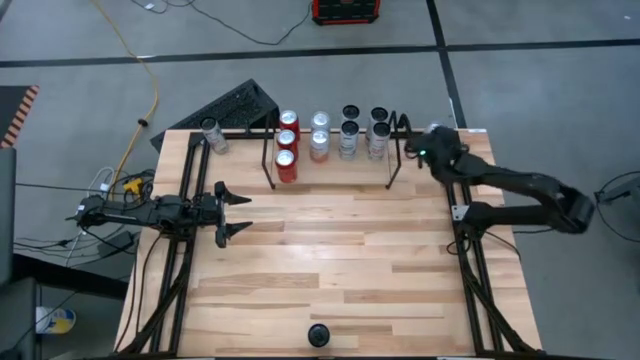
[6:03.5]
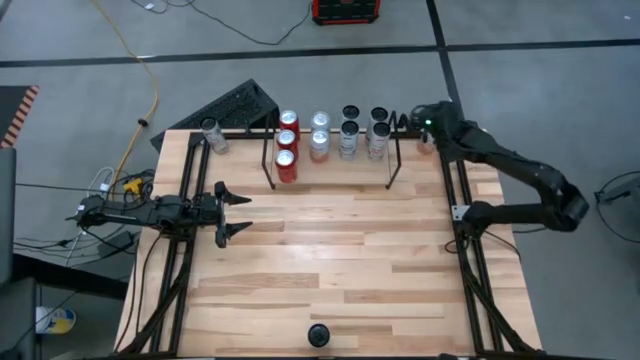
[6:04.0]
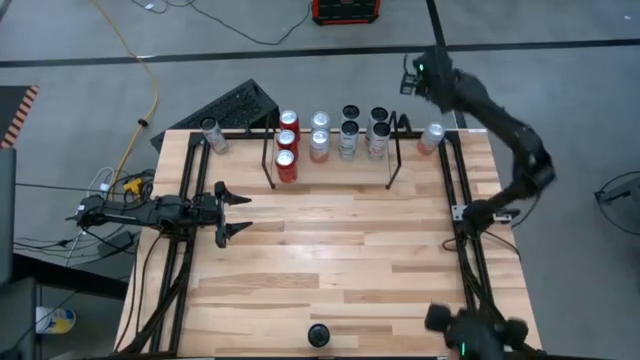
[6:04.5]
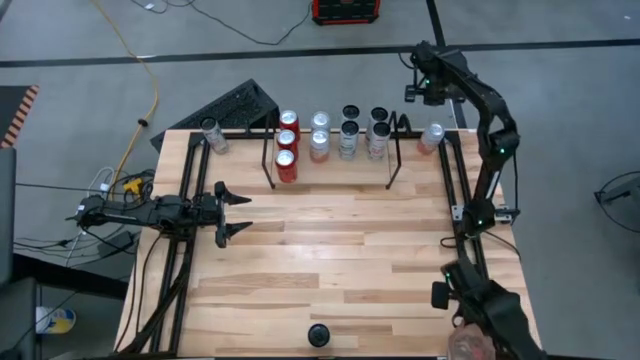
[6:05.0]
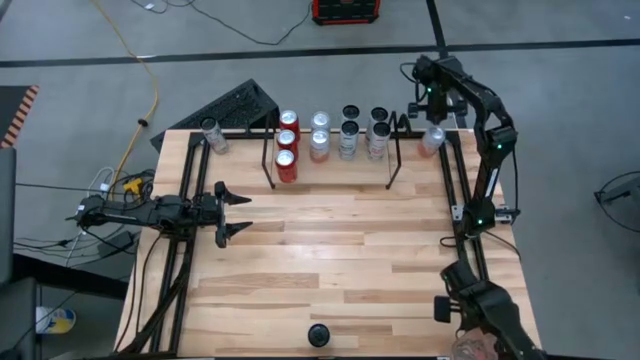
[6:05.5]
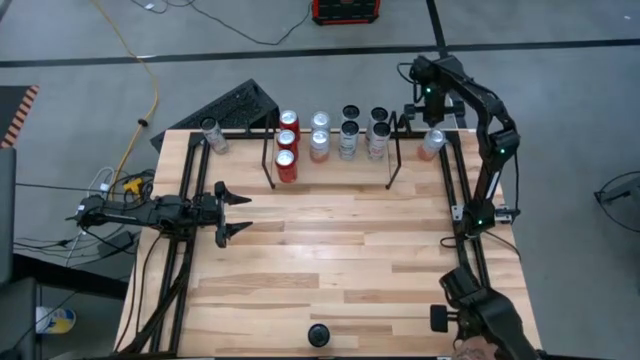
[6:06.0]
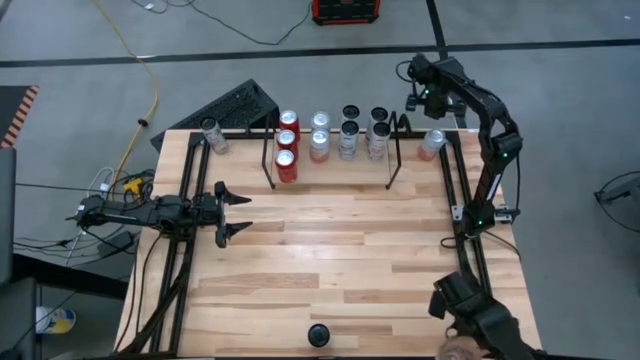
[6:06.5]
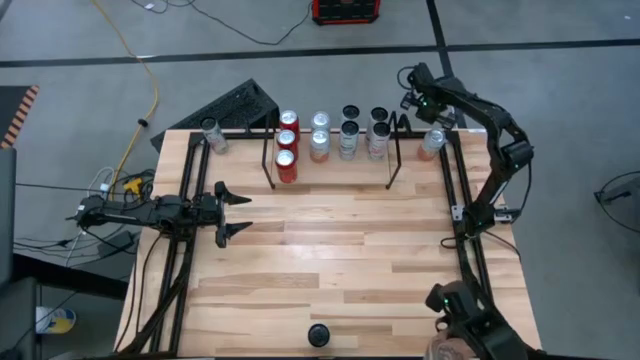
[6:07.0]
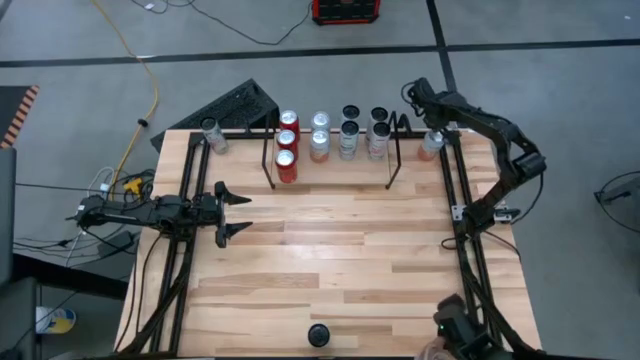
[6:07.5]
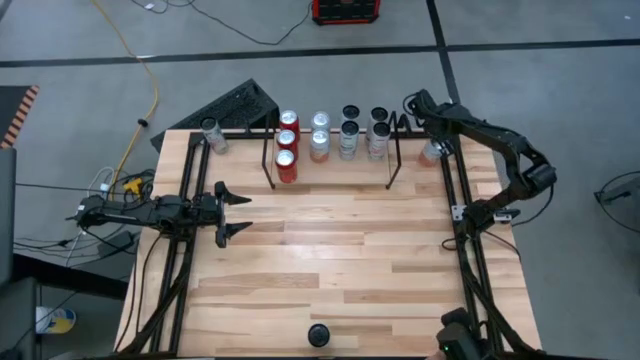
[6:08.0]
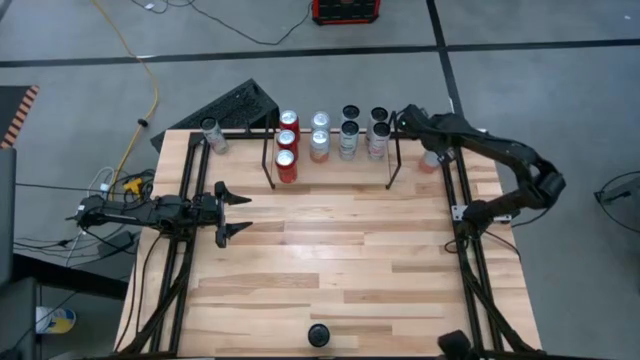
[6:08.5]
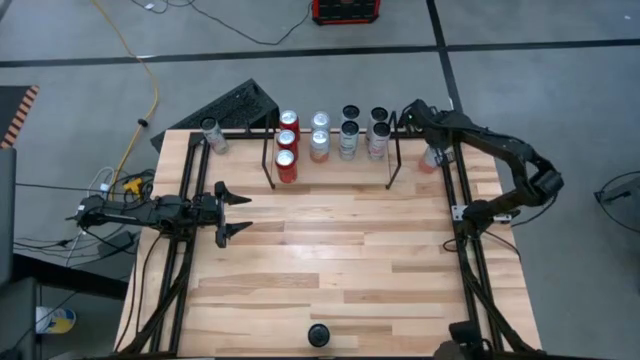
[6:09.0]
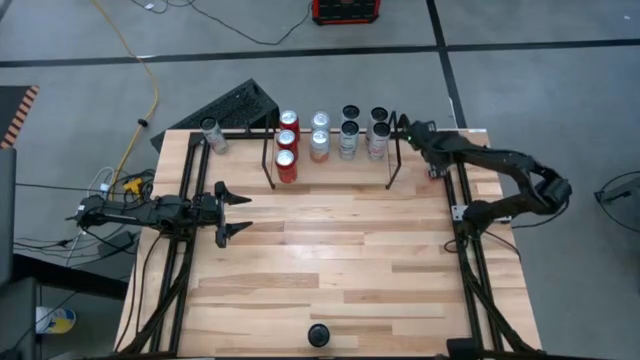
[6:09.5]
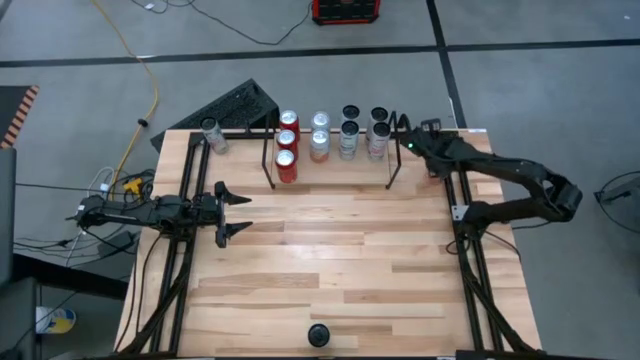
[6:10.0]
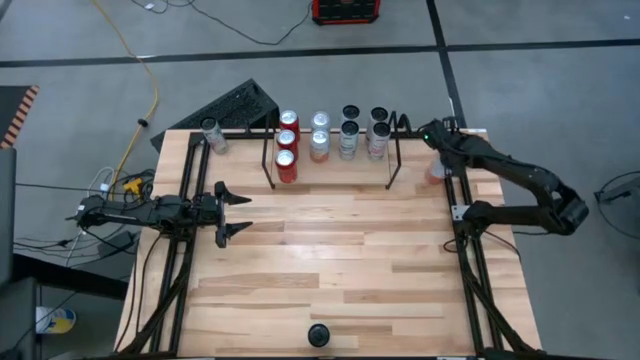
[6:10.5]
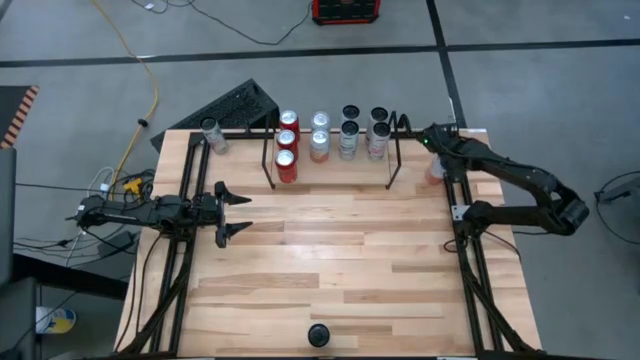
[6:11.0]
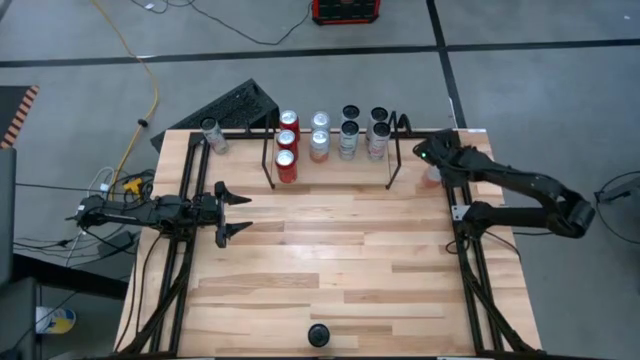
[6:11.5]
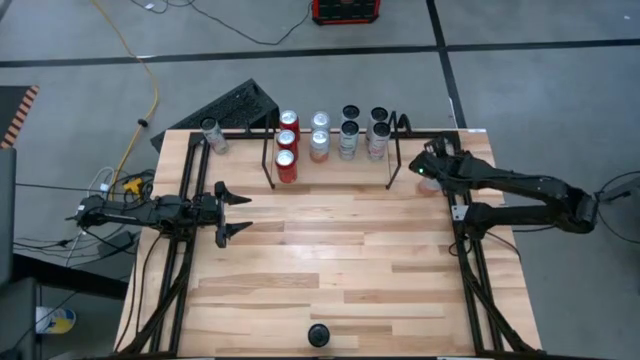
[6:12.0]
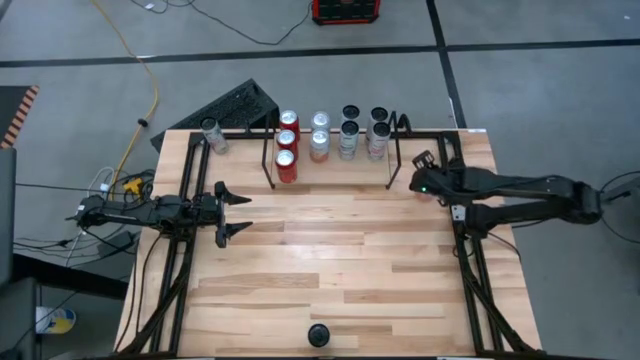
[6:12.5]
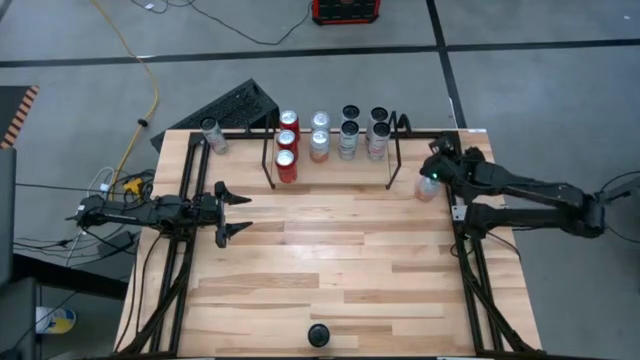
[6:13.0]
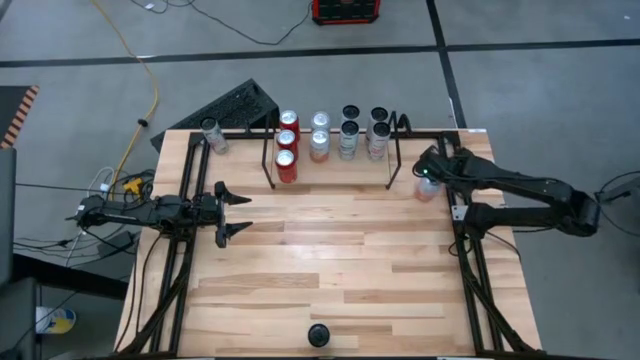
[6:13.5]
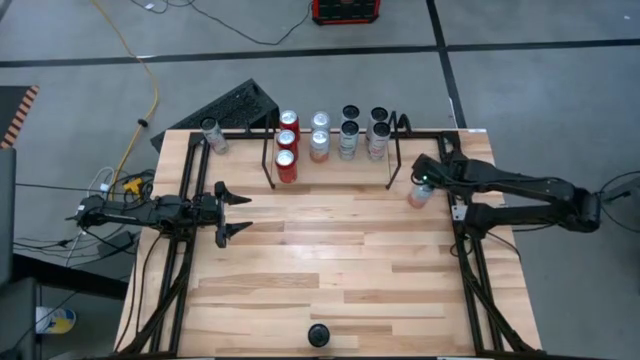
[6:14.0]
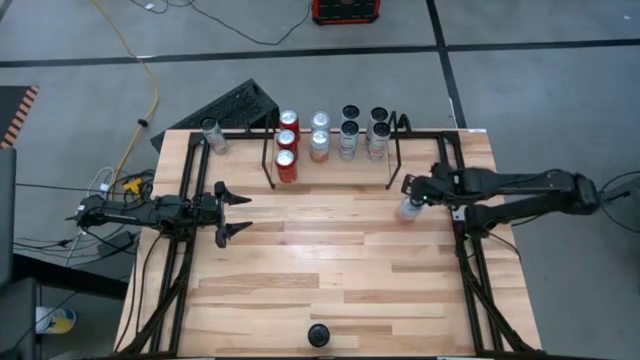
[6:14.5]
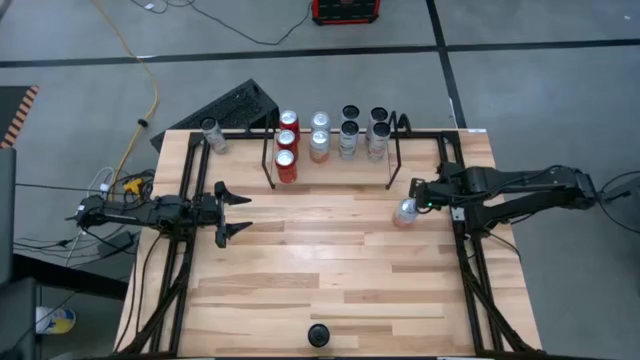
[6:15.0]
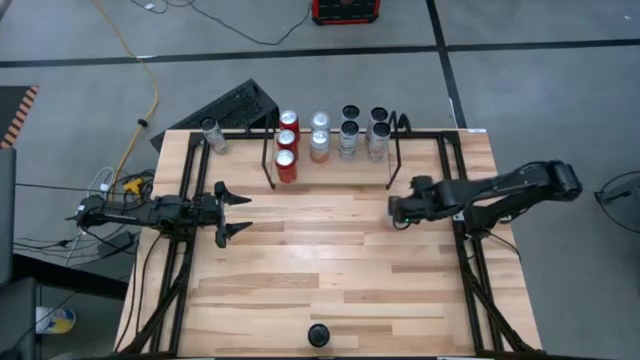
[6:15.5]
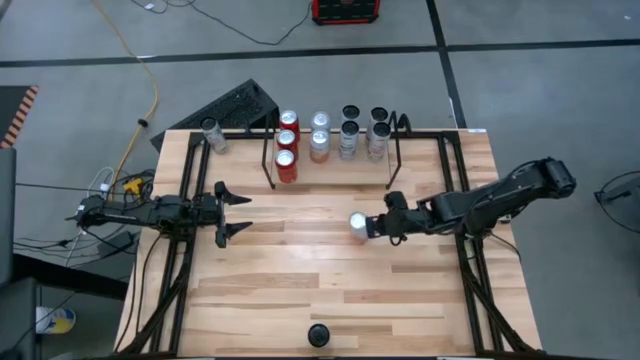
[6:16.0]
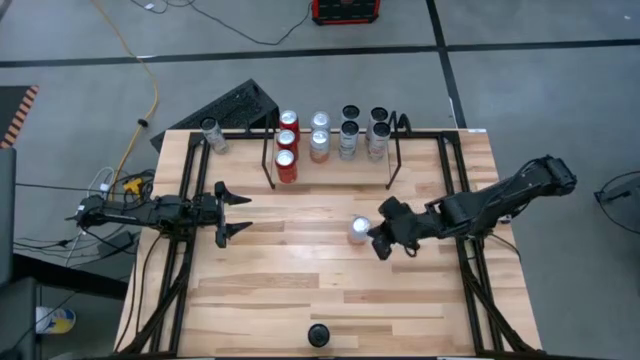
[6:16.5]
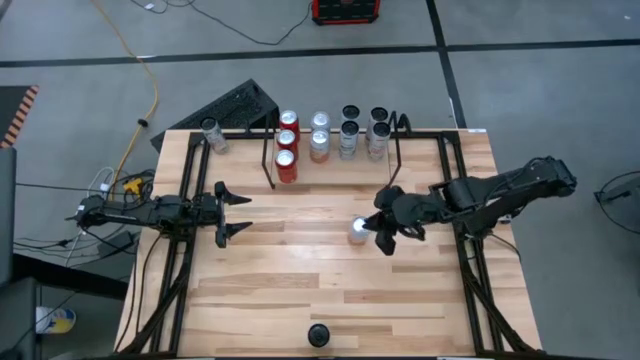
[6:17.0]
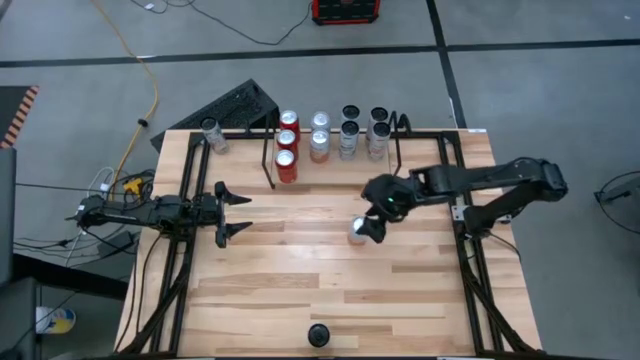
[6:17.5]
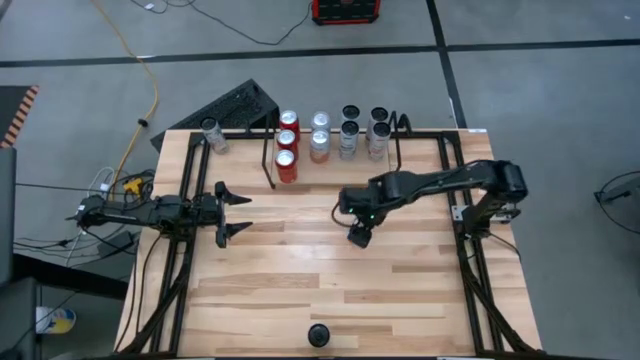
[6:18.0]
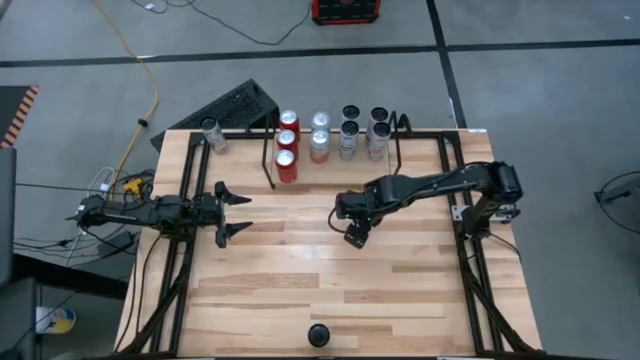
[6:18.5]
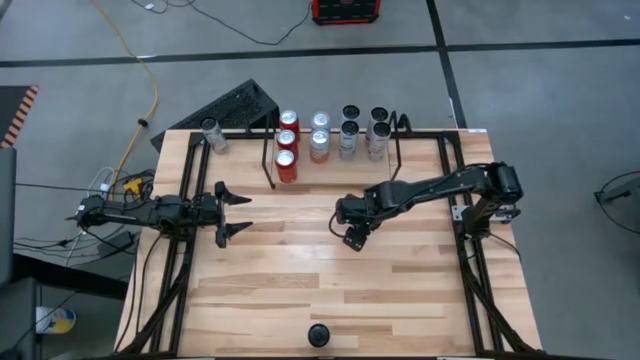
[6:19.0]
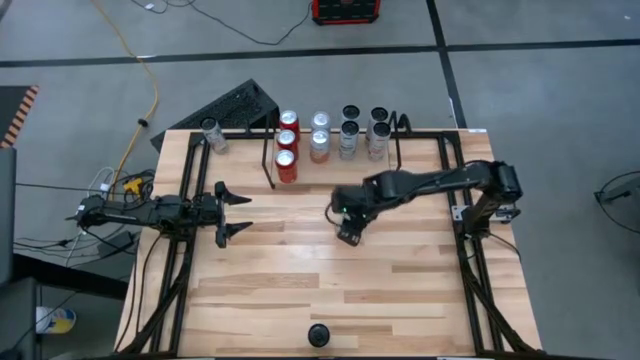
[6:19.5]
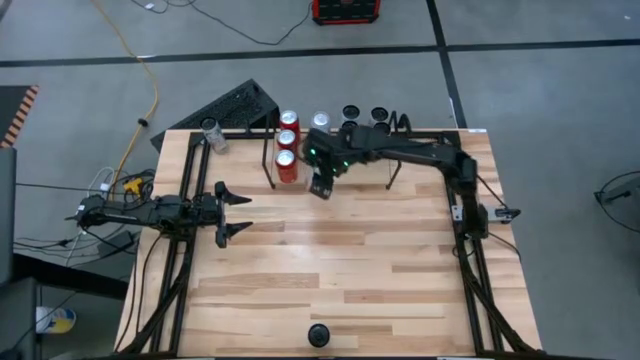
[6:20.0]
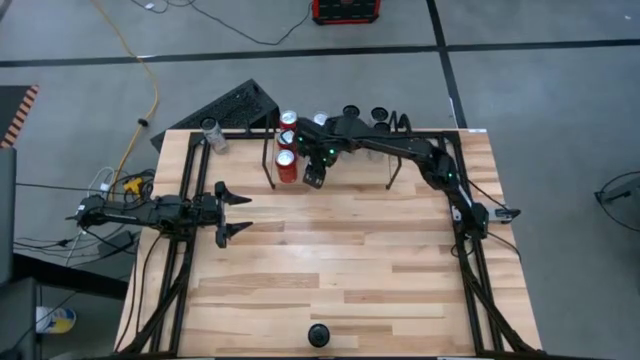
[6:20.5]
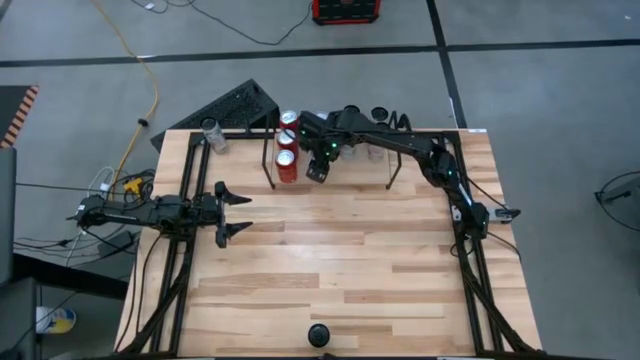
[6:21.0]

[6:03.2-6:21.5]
Task: Place canned beverage on shelf
Put the orange white soda can on the shelf aligned with the other orange white soda can
